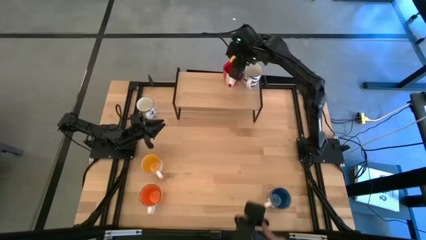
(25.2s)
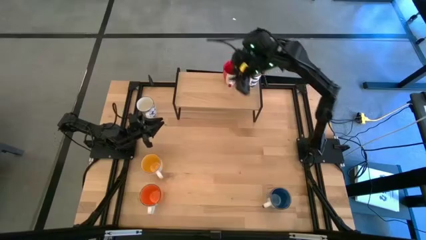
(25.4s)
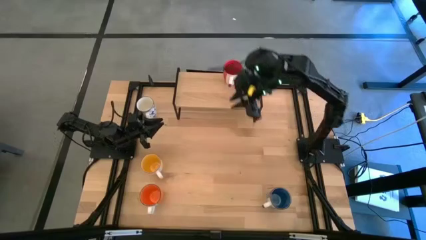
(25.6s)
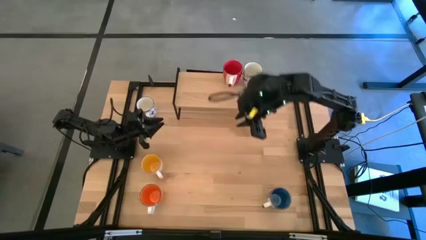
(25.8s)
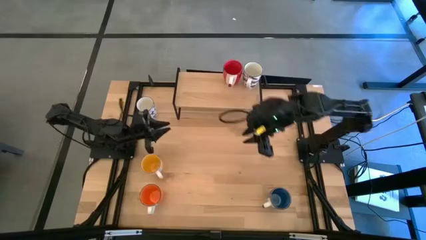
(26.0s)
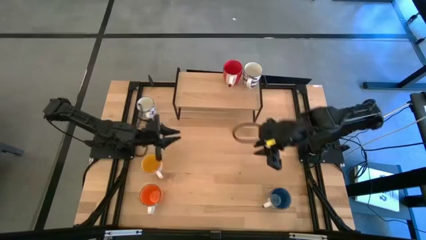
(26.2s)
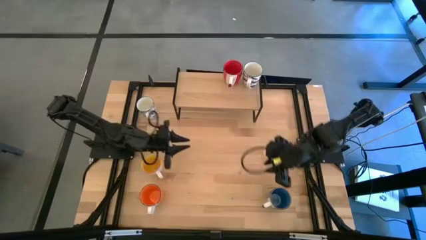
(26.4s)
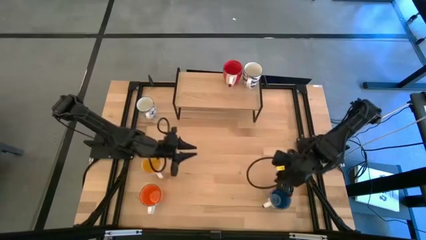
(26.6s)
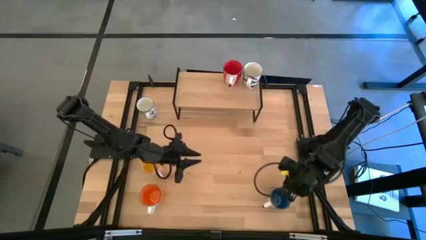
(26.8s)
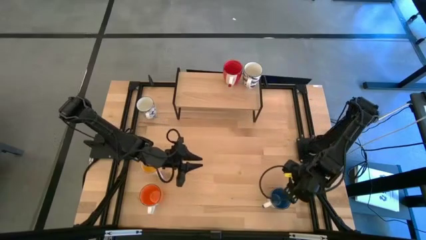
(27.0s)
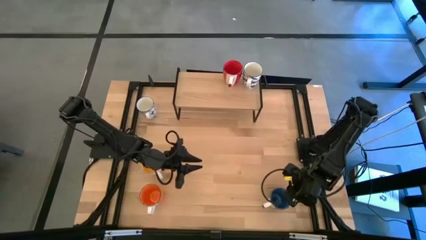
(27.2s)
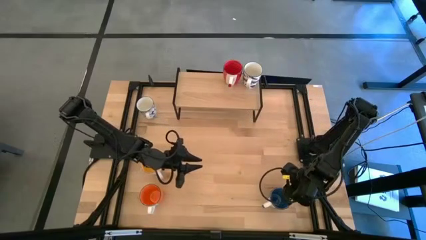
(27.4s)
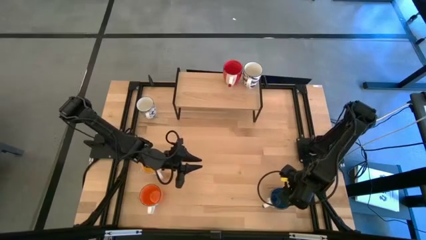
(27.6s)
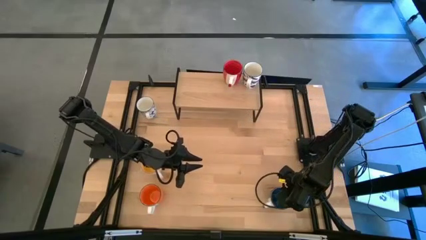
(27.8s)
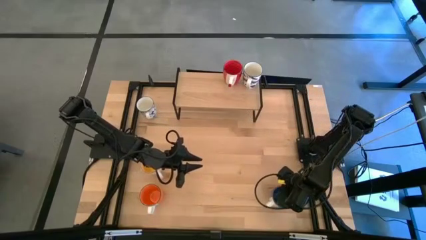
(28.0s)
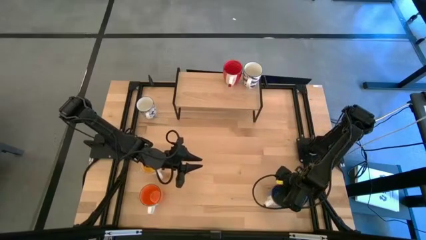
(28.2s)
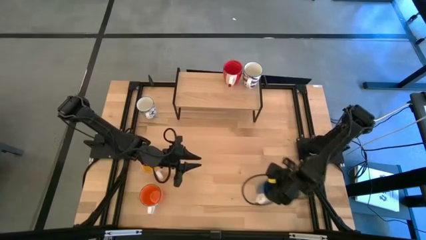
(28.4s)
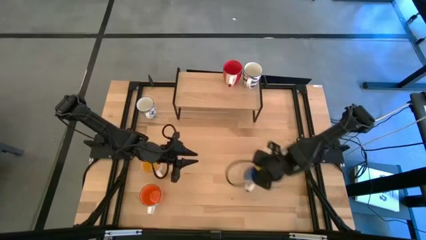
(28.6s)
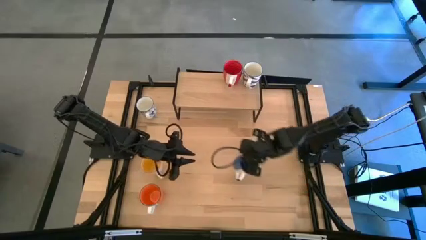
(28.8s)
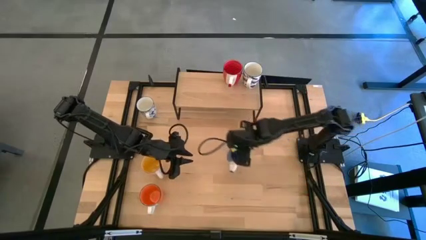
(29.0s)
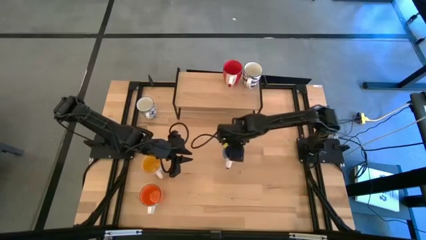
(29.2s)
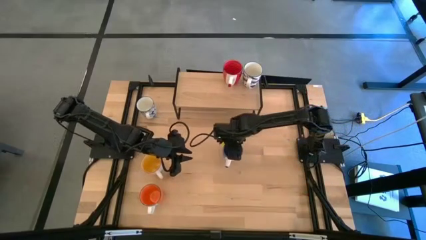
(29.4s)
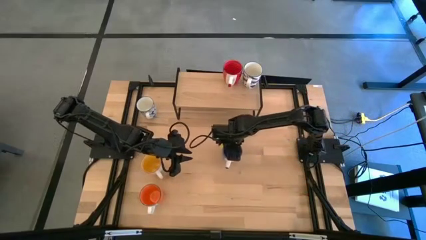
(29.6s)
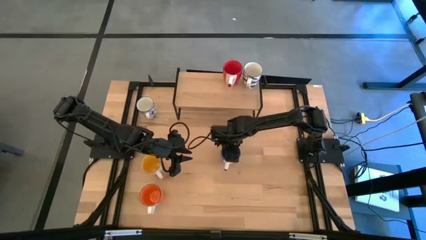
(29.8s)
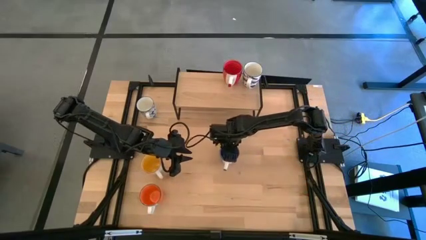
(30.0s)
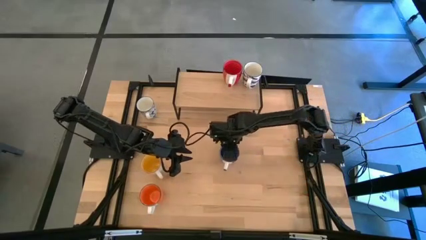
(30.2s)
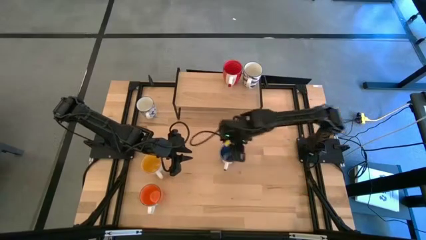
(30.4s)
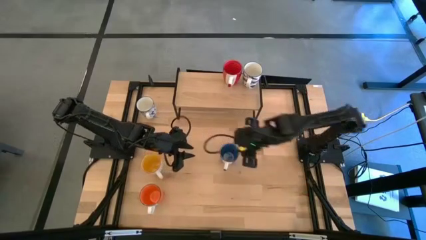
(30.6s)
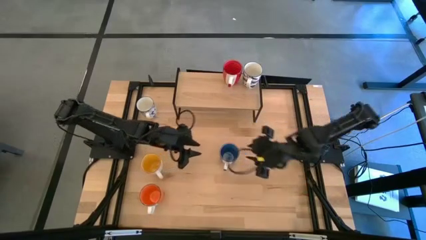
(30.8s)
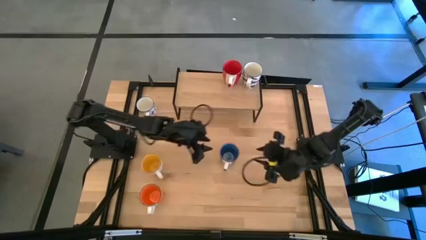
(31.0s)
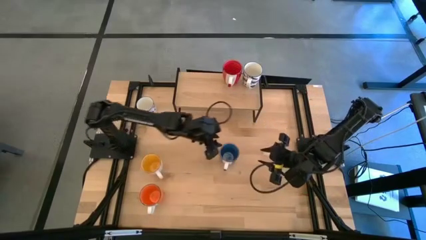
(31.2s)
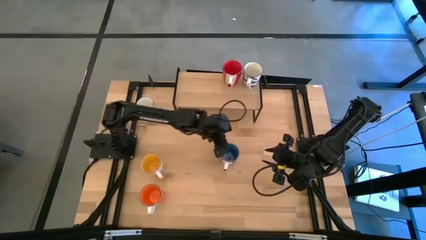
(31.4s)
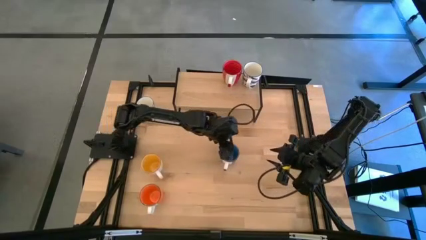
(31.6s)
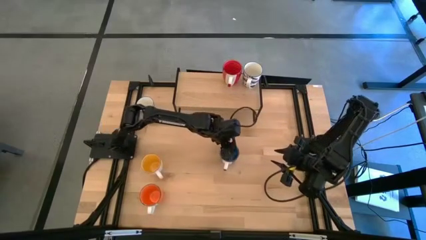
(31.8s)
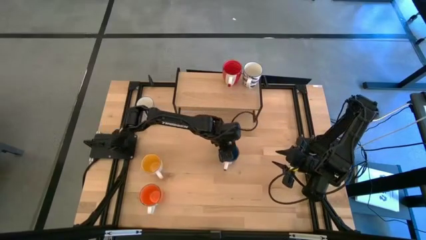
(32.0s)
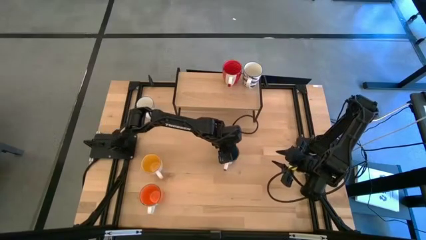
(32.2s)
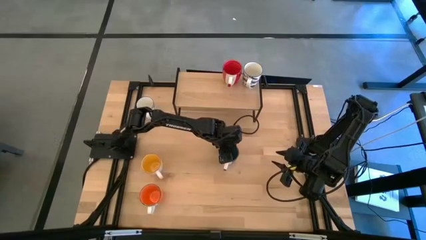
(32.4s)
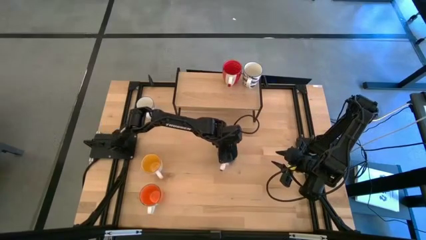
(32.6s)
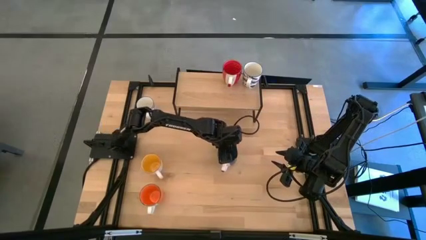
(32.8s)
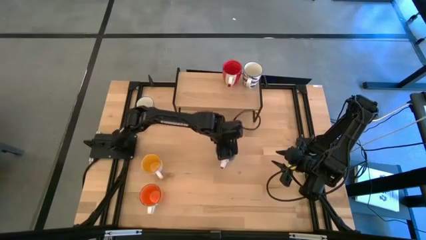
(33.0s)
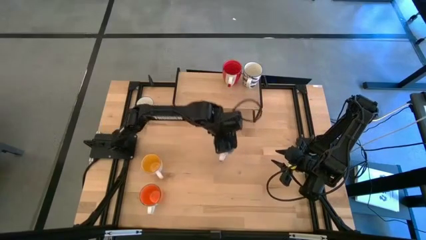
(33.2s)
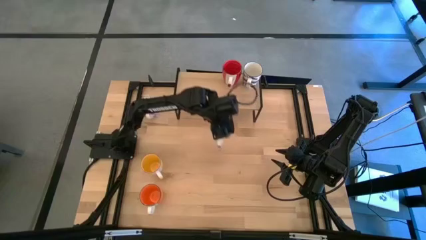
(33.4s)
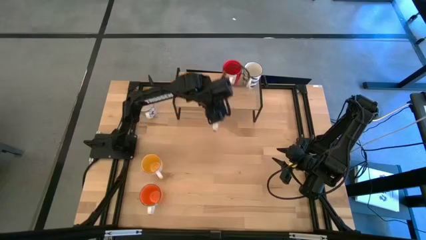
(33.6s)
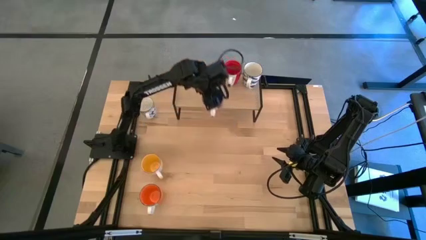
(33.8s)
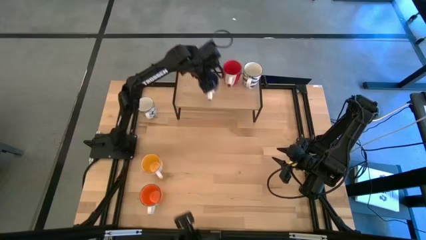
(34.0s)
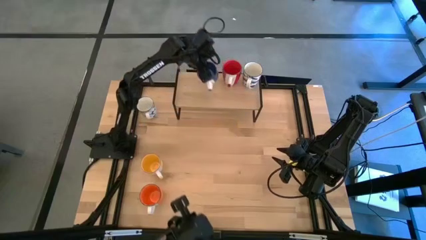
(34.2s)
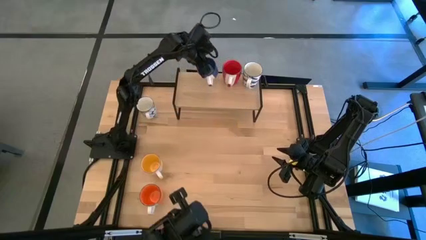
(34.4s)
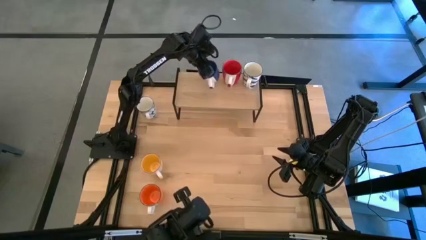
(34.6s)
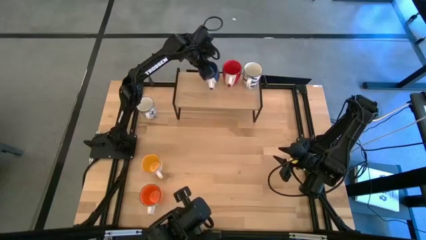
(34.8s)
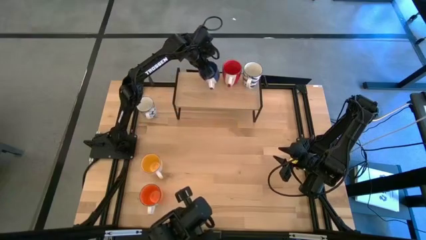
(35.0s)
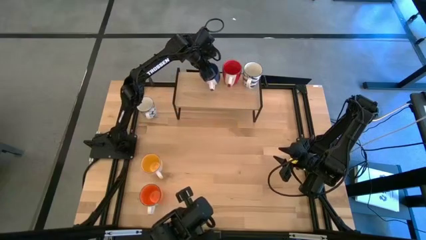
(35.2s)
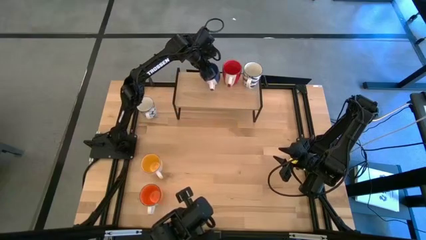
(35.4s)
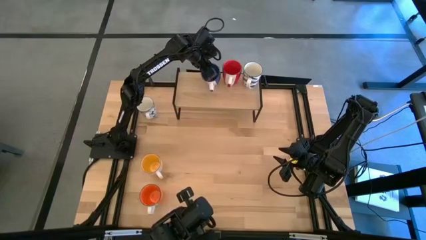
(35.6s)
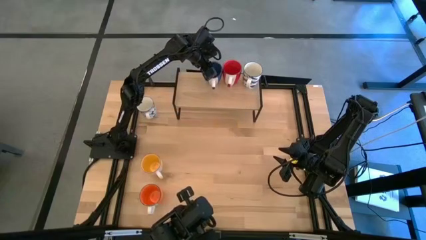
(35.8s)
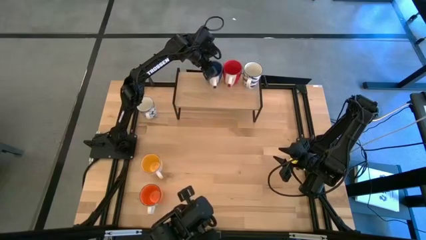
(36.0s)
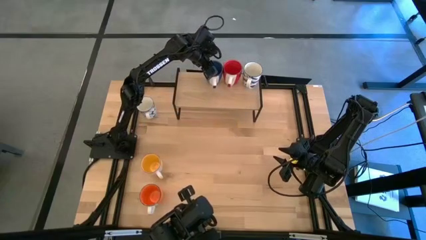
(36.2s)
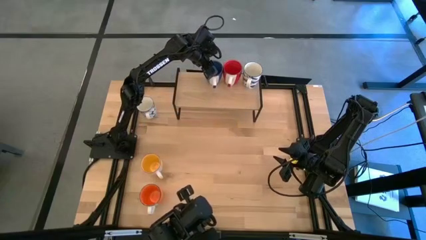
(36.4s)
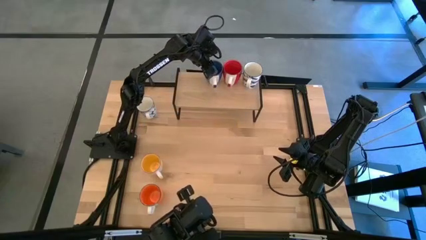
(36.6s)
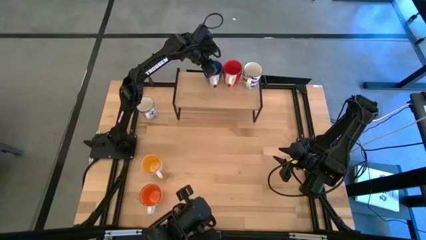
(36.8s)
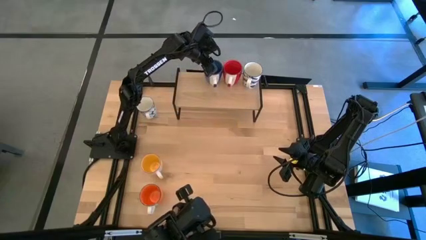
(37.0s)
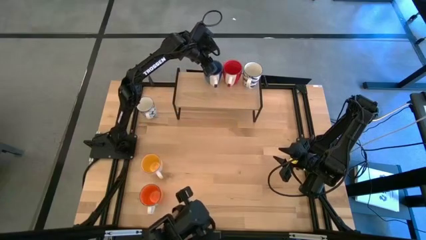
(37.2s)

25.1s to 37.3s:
Task: Place coffee mugs
Put the blue mug on the shelf

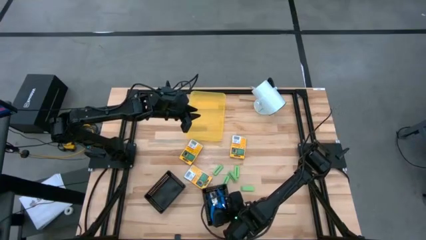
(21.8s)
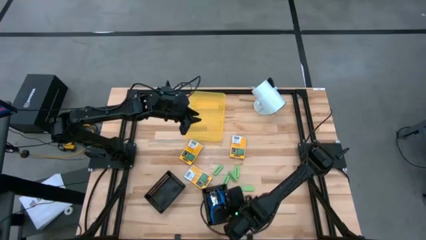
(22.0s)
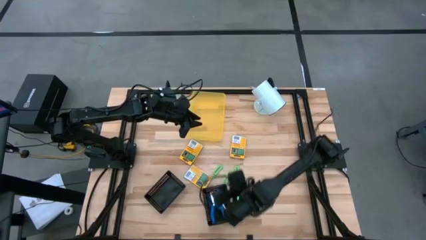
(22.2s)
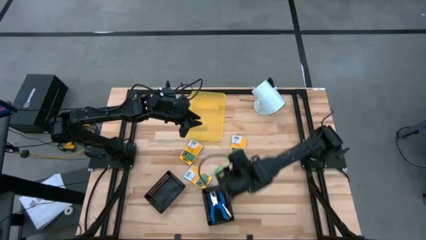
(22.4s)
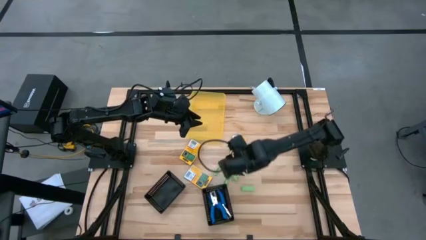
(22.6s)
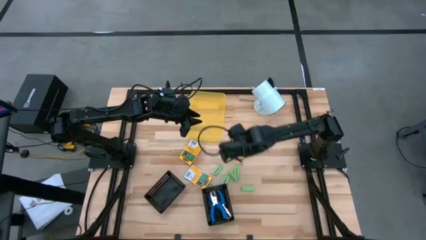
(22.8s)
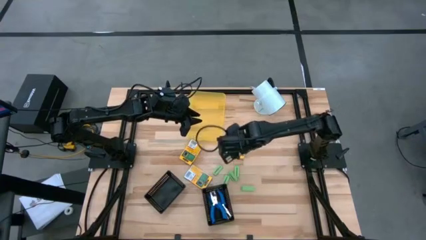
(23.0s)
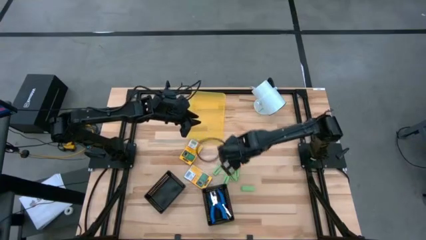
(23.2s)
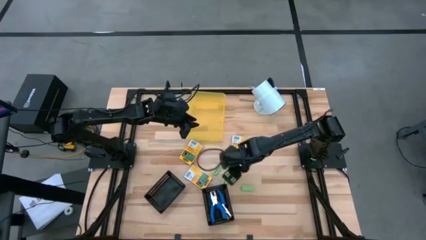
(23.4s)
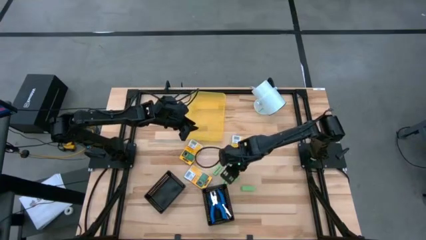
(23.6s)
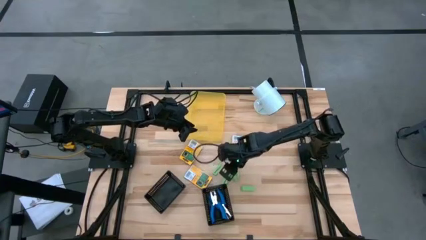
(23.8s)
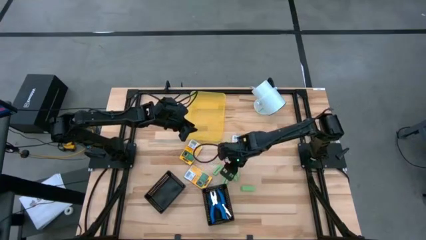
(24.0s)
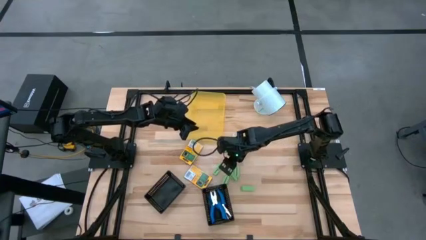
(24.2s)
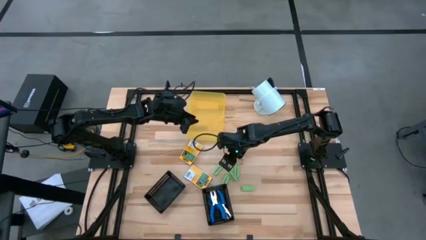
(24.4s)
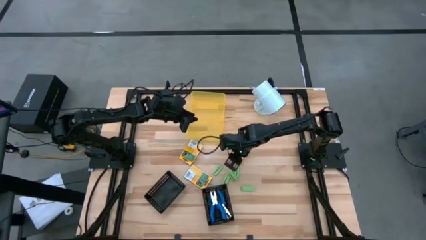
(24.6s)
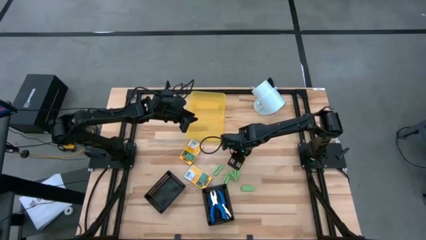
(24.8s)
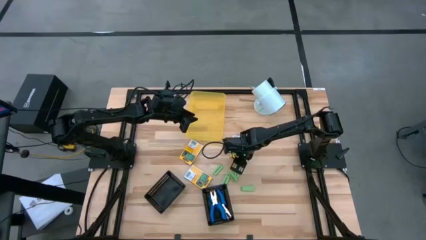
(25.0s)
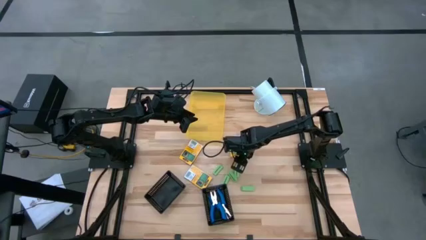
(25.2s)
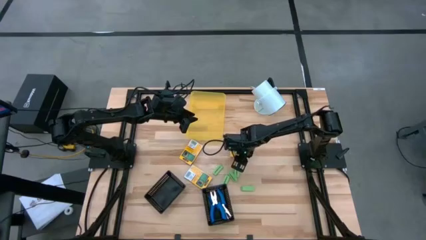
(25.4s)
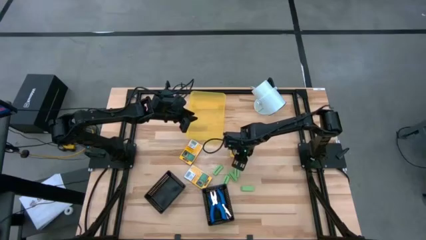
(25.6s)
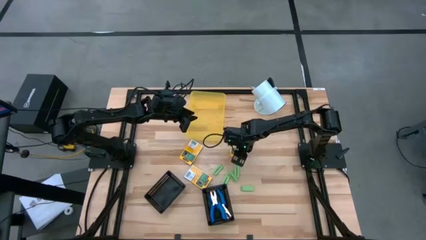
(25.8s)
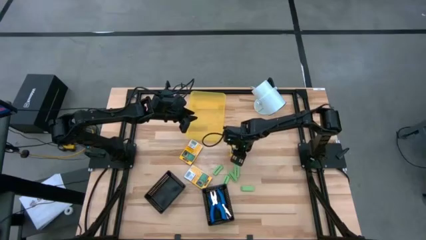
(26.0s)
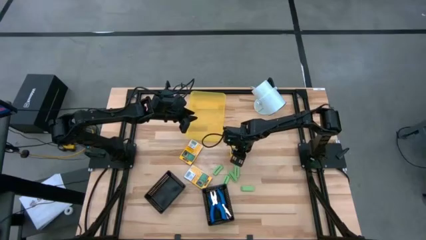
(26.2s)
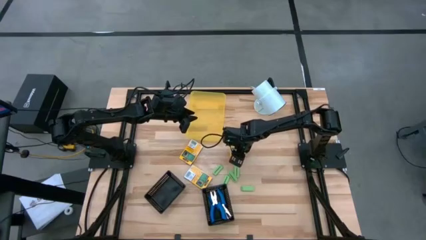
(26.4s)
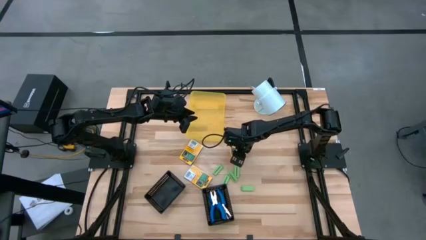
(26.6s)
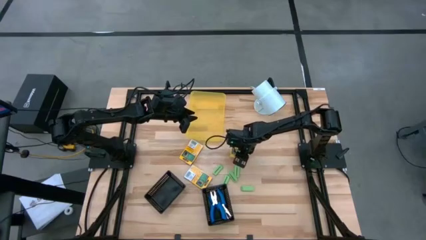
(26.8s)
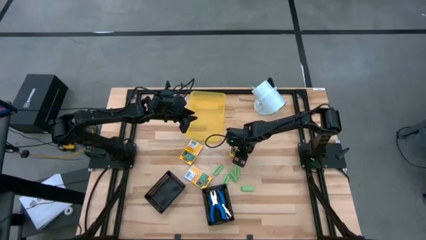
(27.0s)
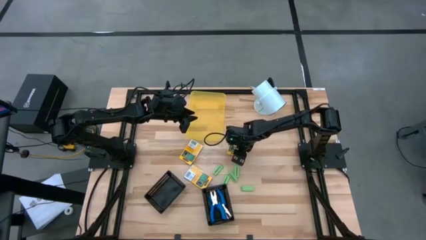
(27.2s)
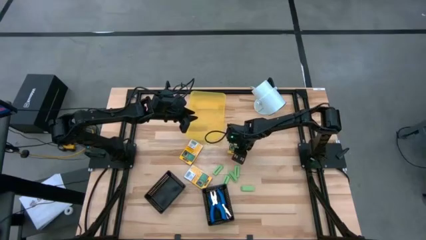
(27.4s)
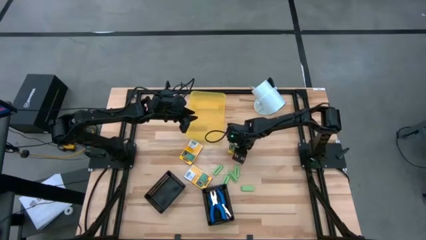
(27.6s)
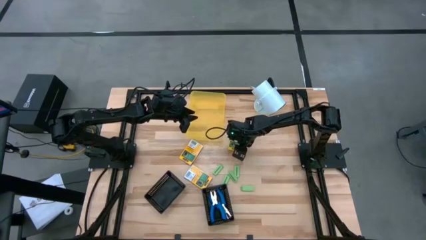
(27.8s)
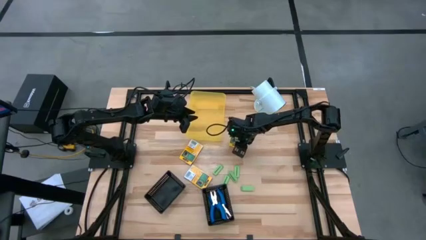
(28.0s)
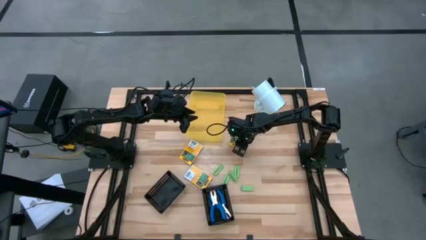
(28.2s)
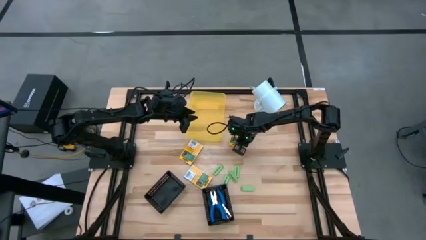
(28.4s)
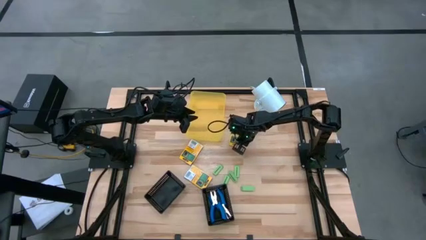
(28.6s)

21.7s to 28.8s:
Task: Pick & Place School Supplies
Put the box of crayon into the yellow bin
